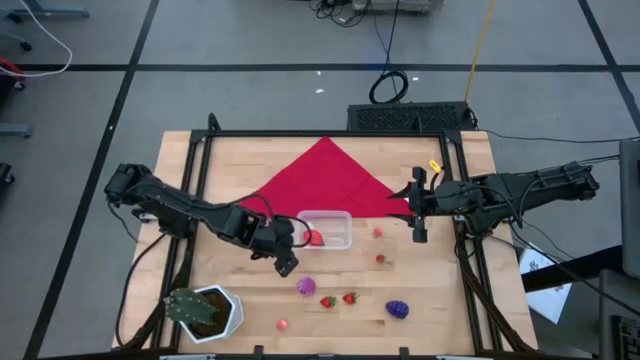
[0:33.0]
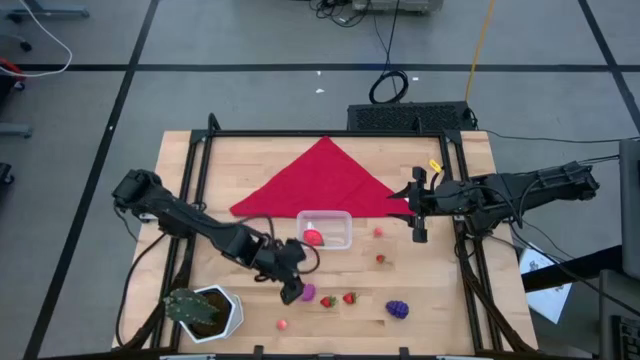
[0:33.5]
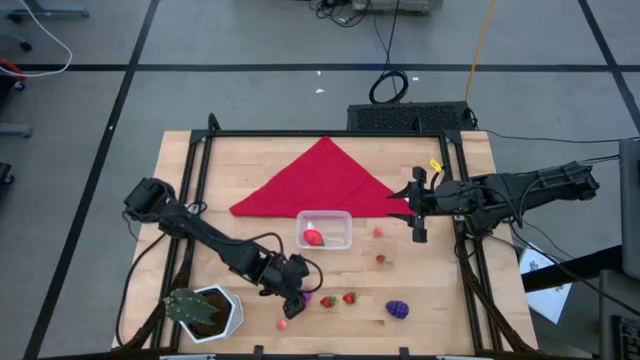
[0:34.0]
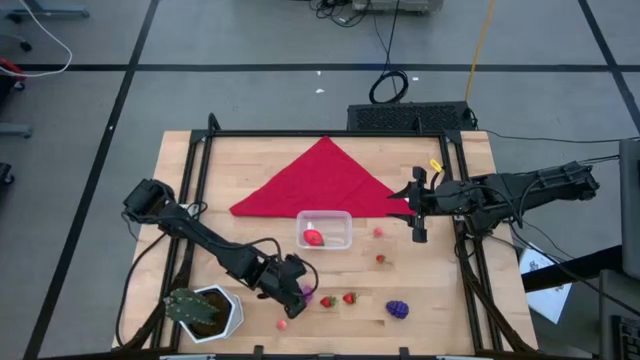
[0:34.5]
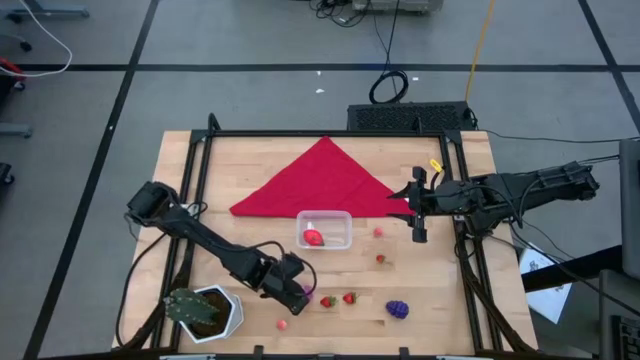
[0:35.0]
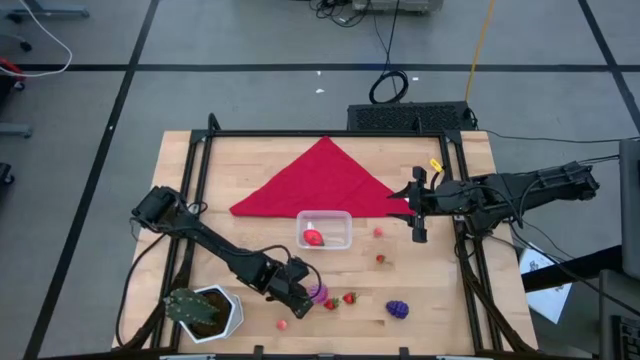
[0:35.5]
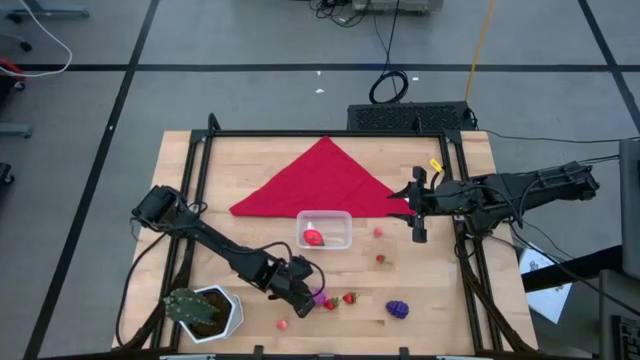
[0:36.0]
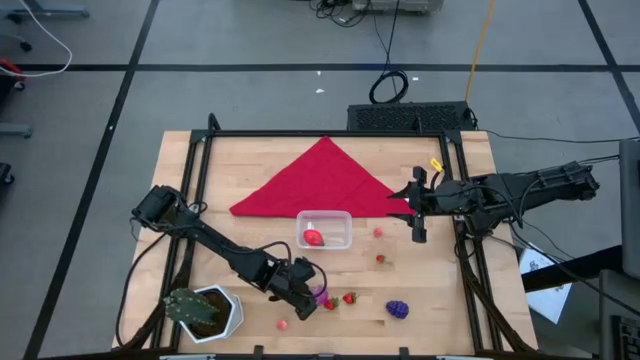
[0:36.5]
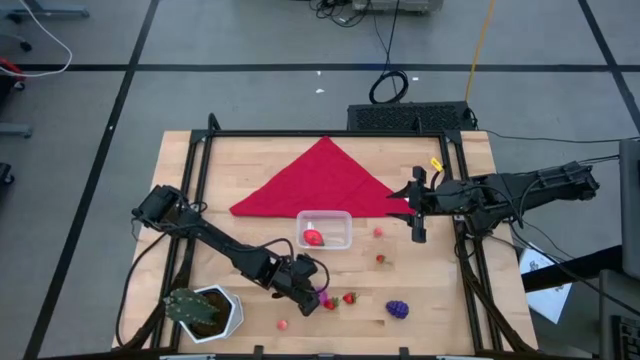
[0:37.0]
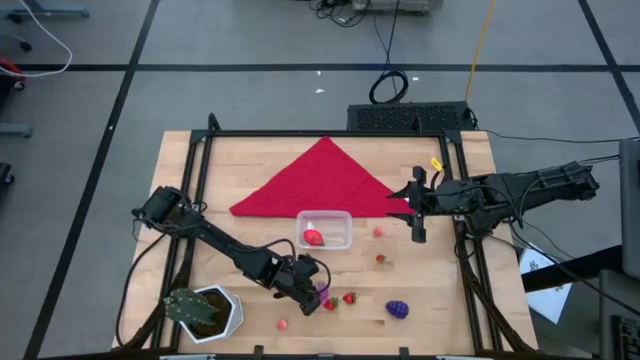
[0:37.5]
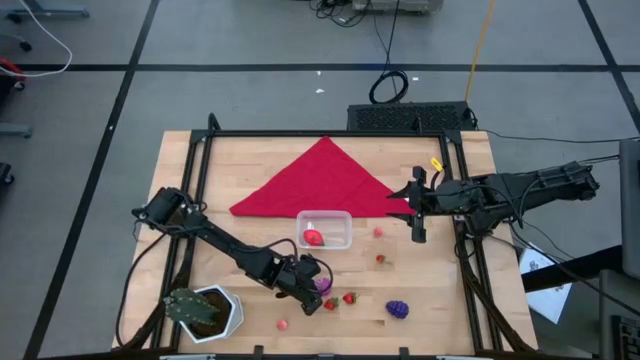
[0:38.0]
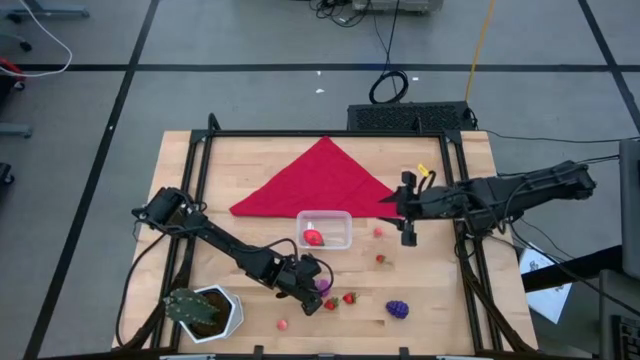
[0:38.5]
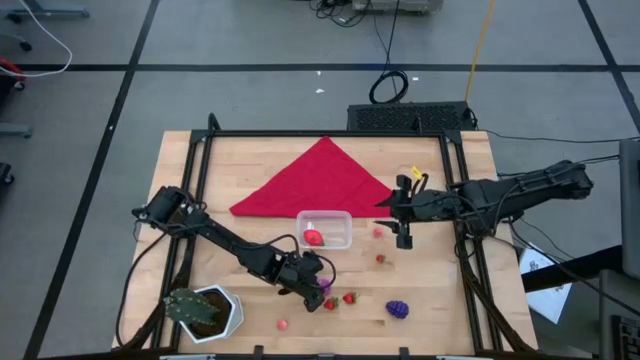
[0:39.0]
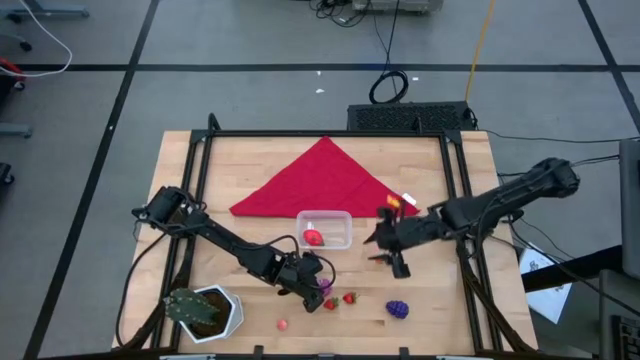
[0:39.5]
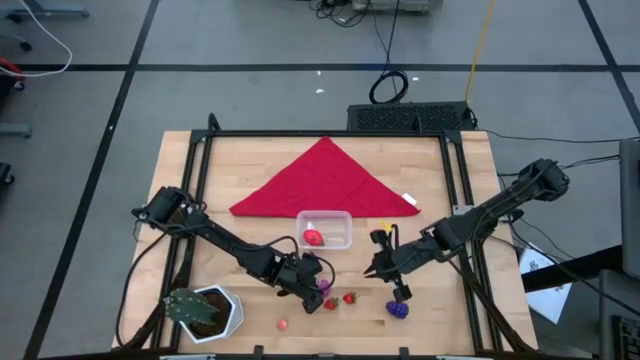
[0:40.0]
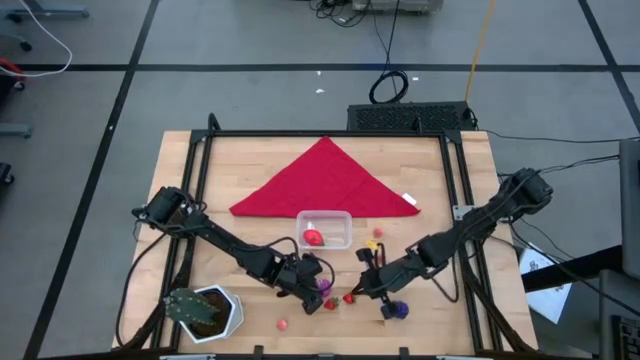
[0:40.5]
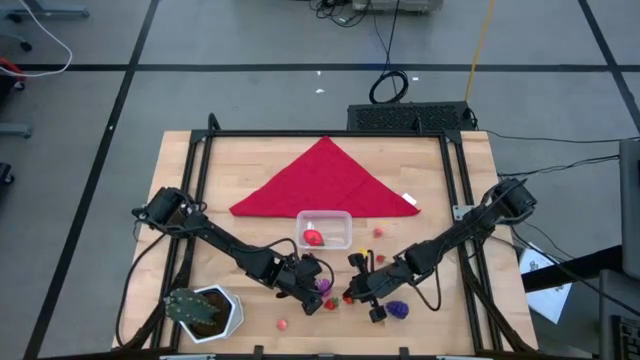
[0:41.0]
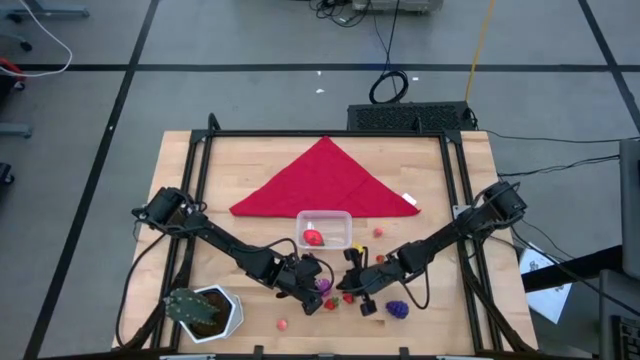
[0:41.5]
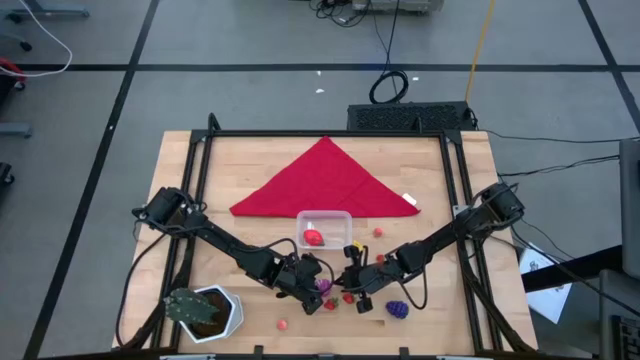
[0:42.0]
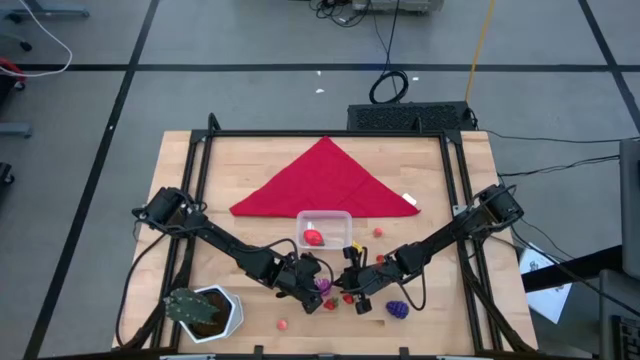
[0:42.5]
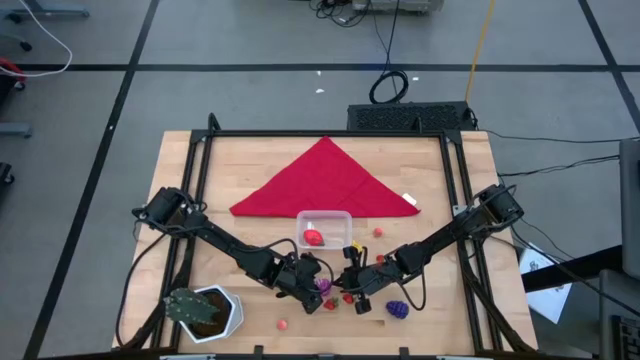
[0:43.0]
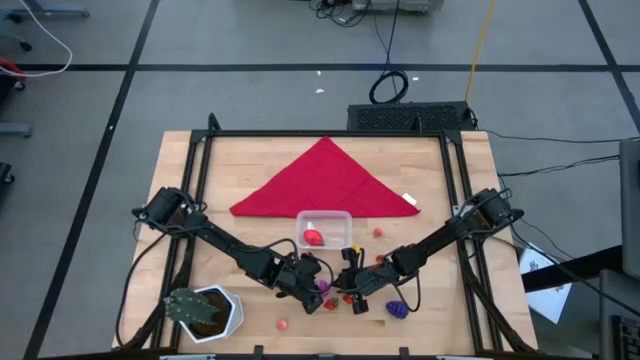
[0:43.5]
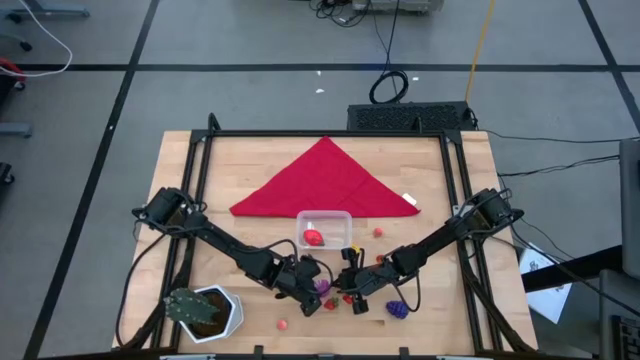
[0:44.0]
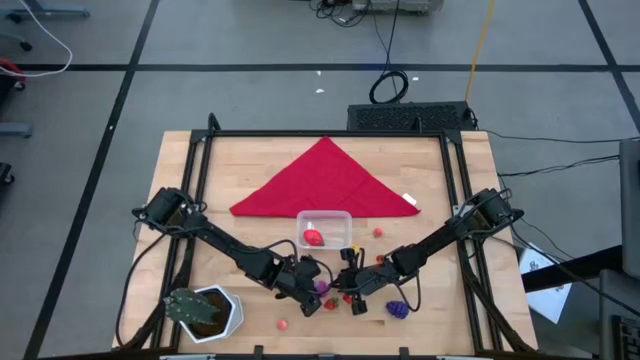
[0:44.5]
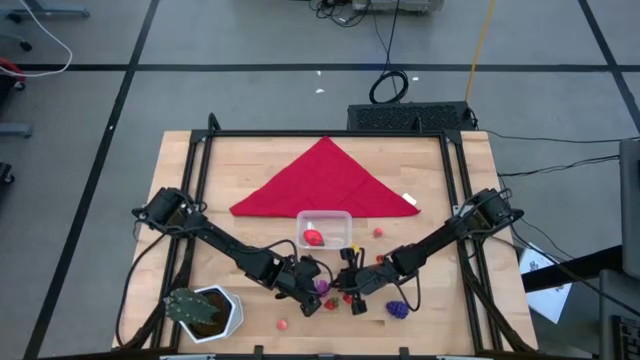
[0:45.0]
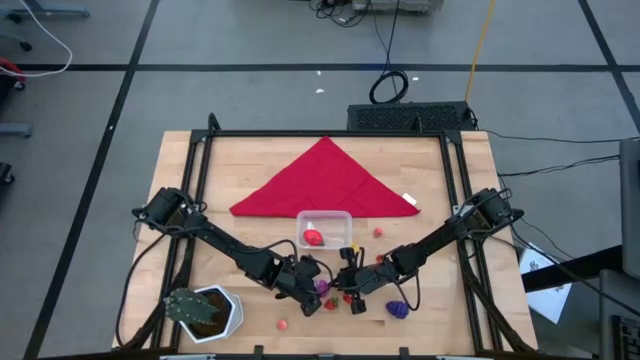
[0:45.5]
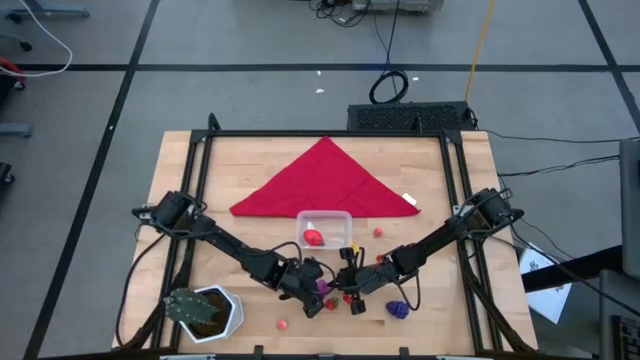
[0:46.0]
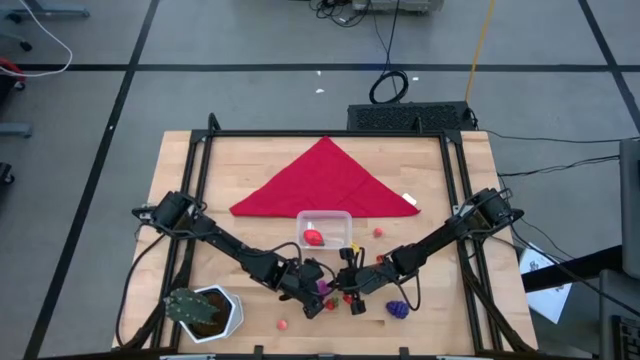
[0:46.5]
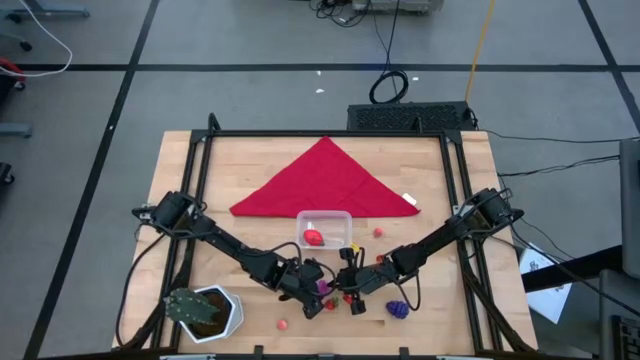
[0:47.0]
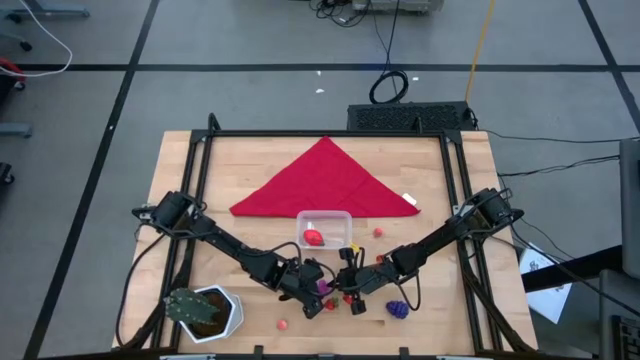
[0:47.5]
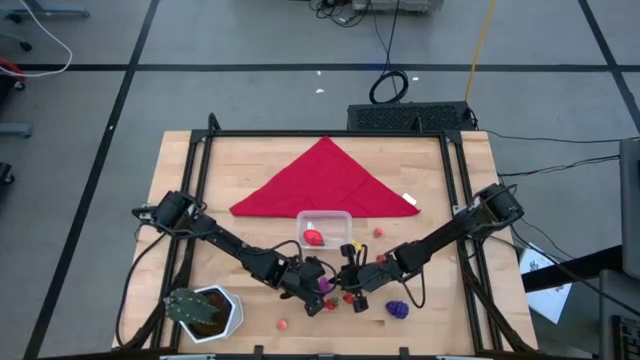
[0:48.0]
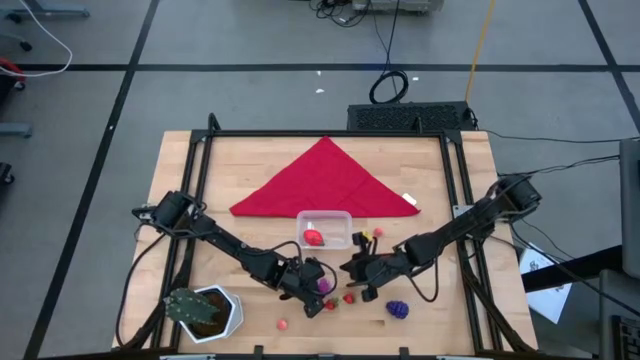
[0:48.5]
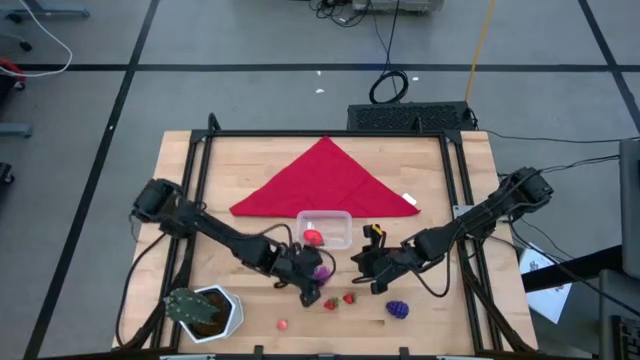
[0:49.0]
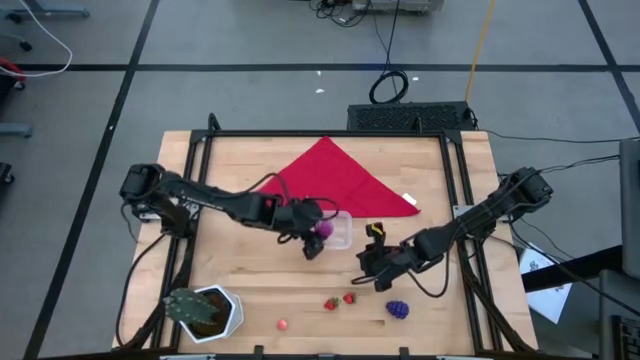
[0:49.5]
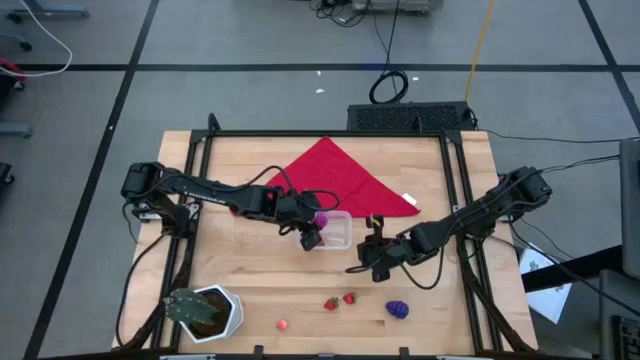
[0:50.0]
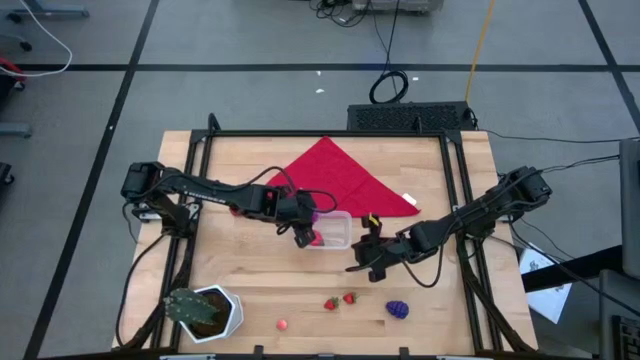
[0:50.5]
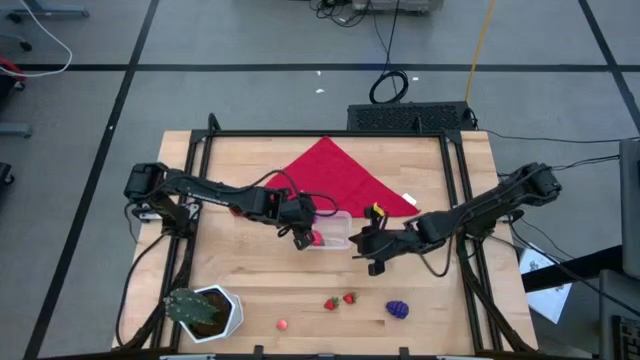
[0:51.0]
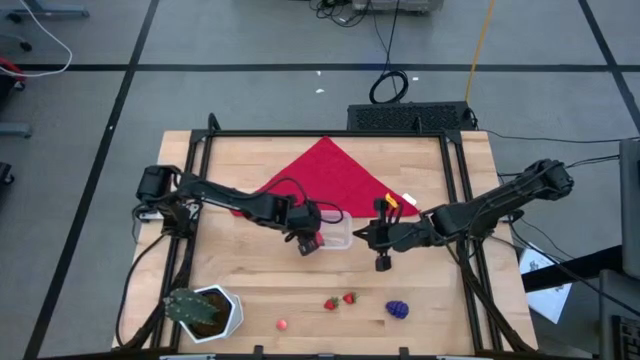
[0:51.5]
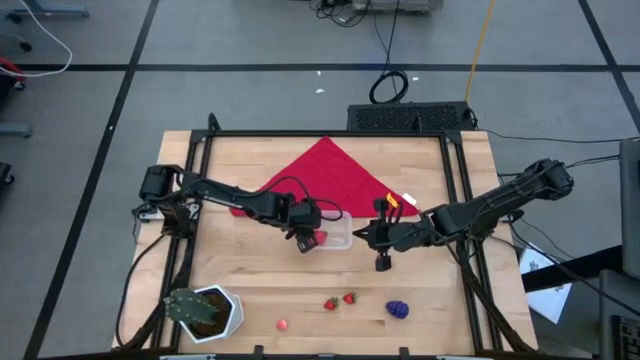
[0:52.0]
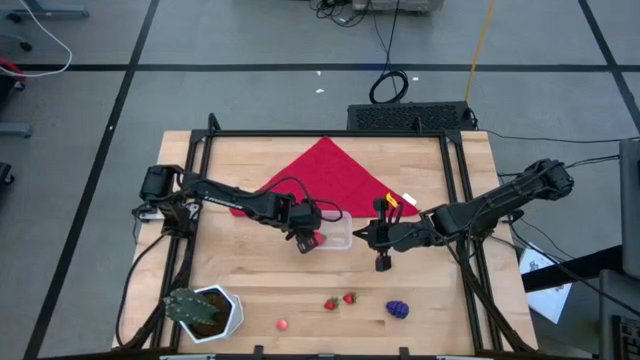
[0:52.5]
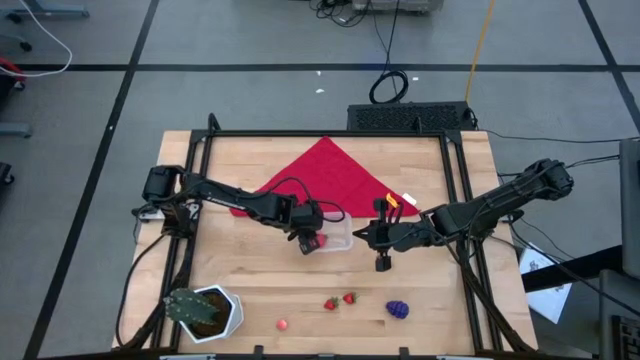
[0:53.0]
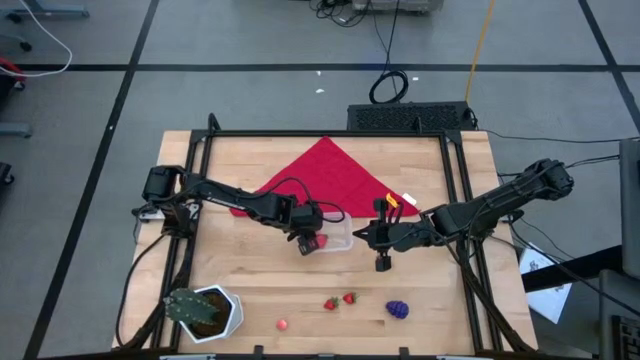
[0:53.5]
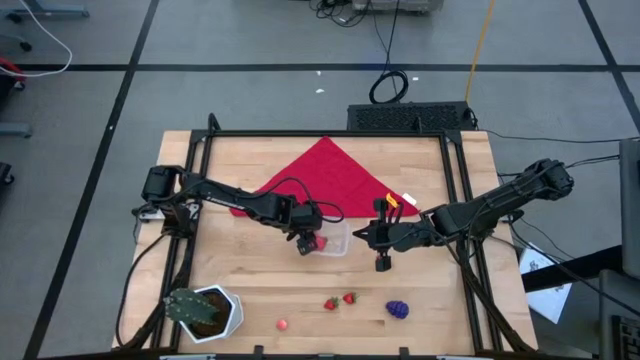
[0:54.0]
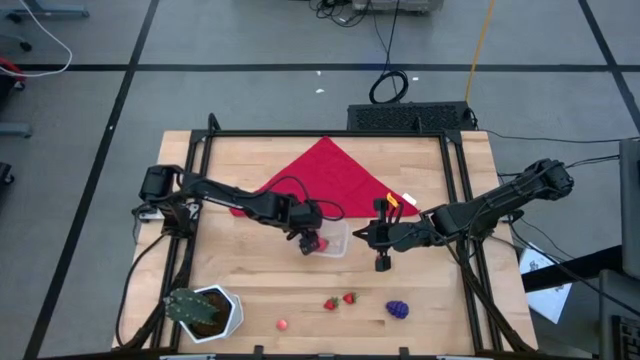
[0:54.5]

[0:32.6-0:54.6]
Task: Pick and placing Produce into tupperware
Put the red onion in the transparent bin
